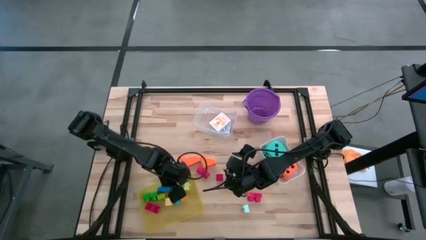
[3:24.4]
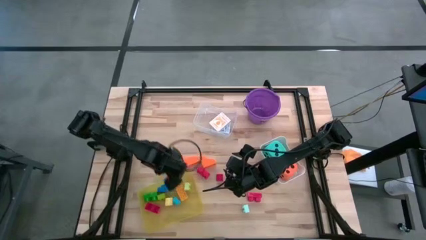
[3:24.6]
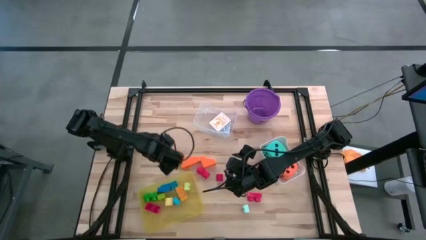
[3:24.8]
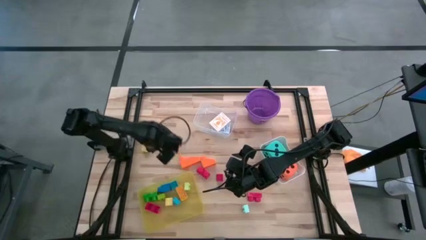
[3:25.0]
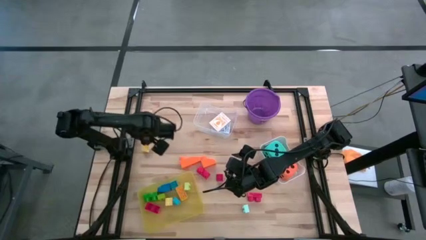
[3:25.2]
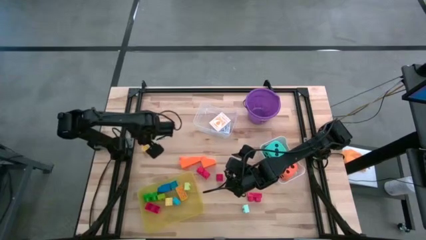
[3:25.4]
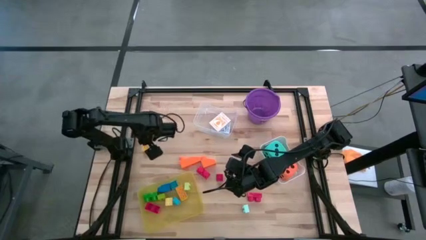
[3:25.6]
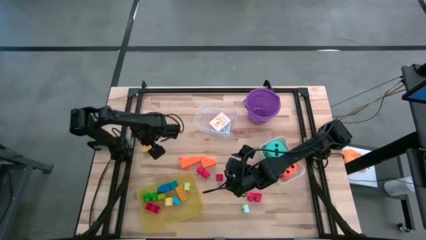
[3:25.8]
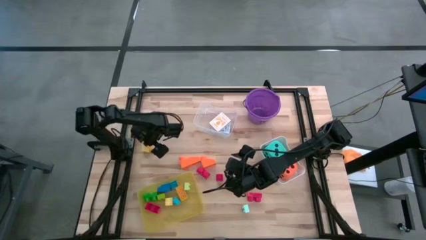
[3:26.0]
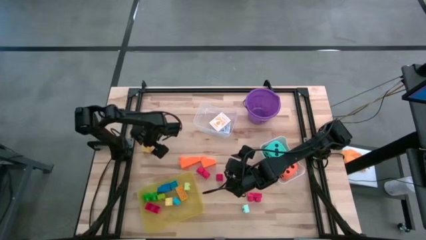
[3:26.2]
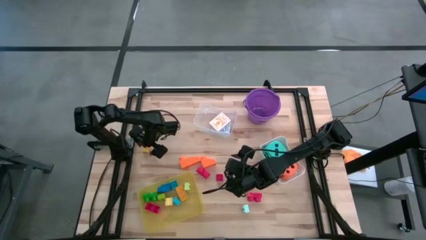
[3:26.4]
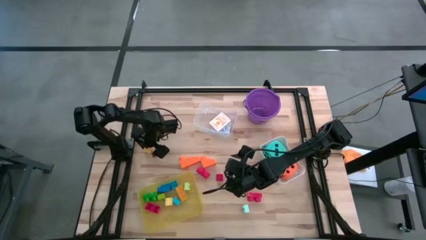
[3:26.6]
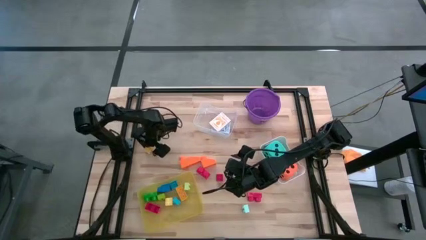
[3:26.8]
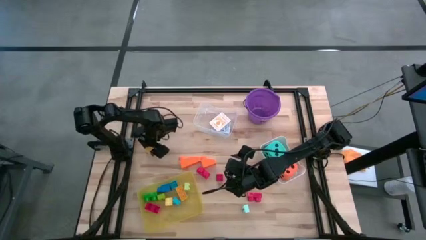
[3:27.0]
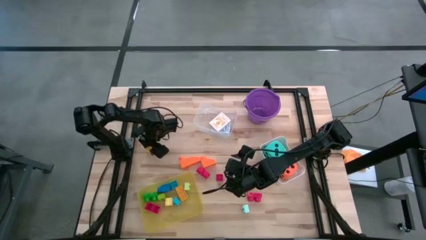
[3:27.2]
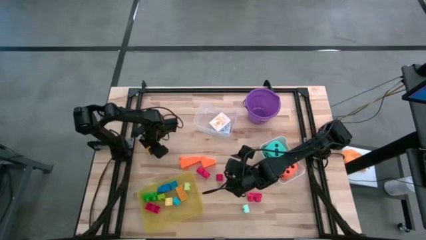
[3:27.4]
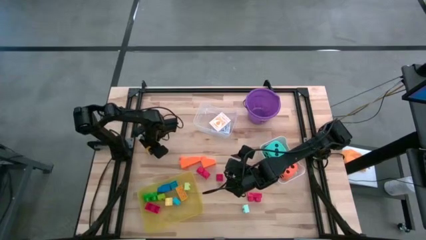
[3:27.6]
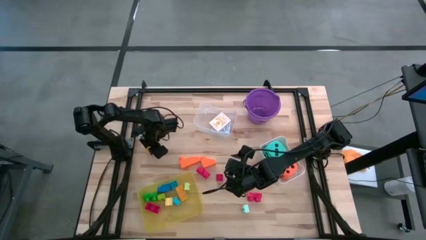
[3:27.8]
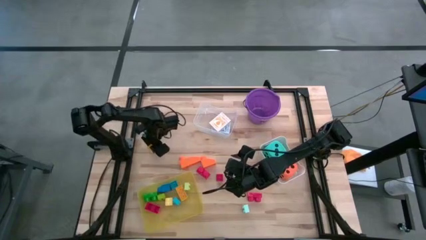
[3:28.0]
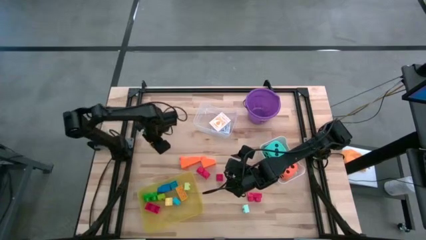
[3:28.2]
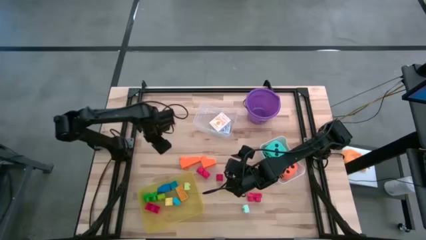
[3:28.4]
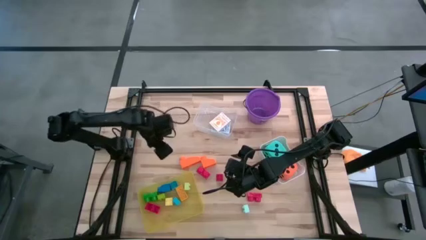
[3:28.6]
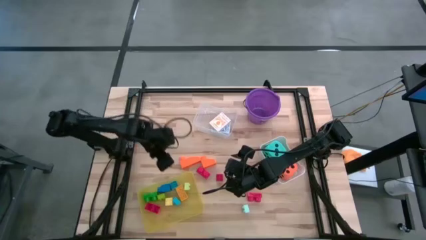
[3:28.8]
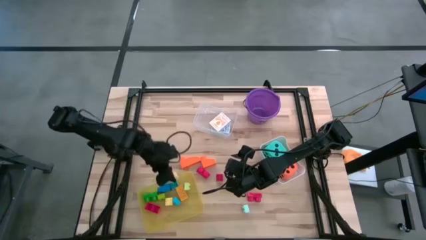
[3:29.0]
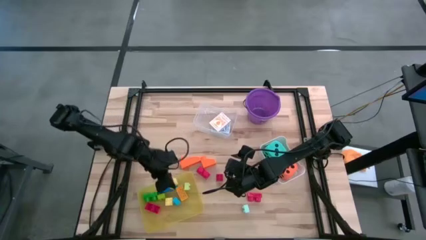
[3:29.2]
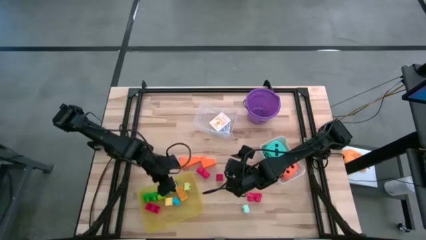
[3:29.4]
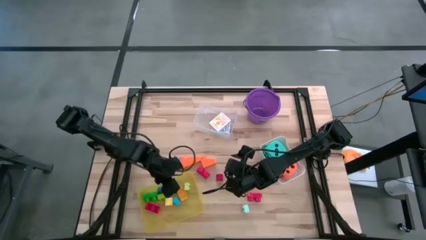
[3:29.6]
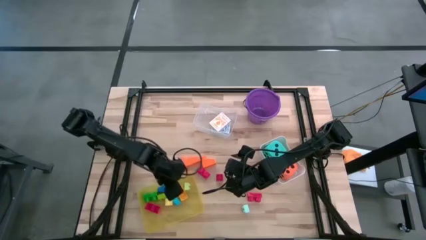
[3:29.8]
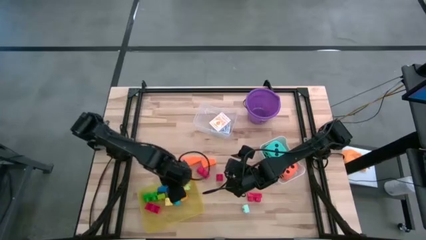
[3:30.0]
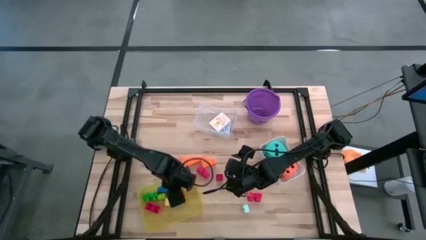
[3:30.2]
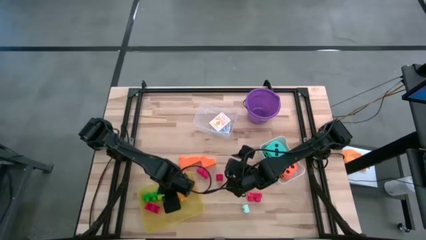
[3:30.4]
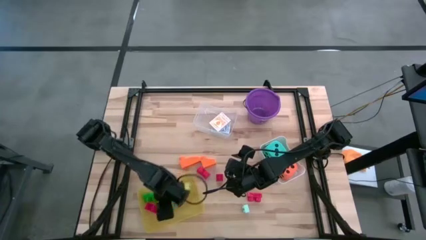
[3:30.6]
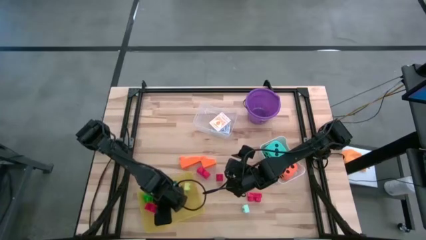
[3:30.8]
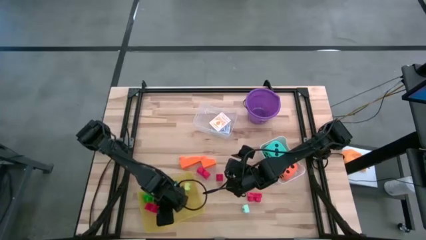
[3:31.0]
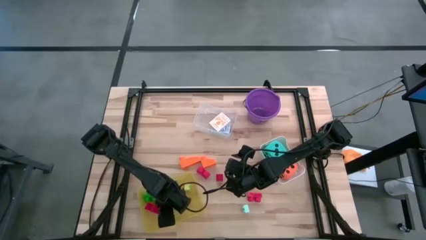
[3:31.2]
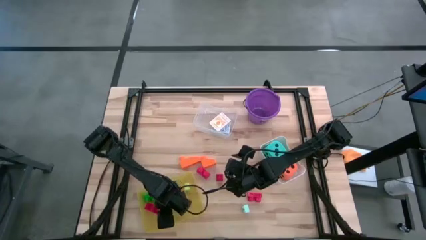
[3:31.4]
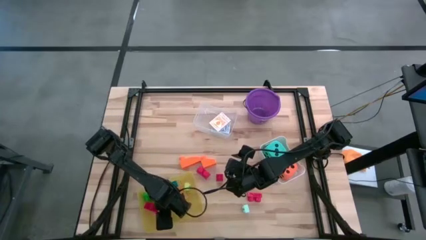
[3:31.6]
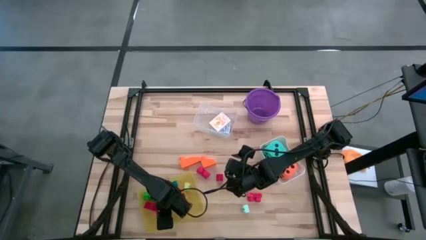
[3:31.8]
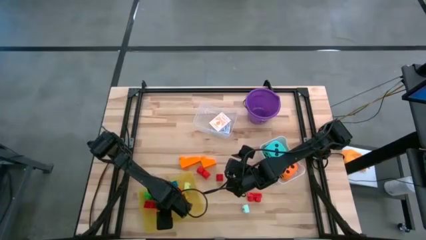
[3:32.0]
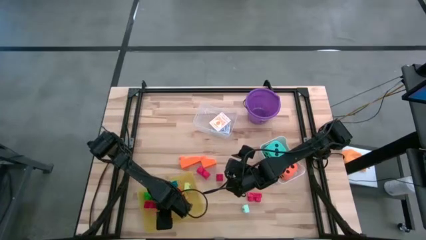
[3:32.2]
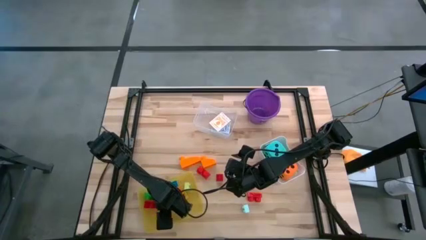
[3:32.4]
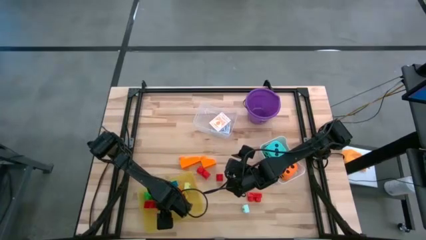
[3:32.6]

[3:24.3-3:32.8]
Task: Pick & Place Toys
Put the yellow game piece into the yellow bin

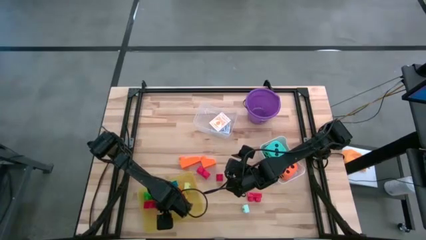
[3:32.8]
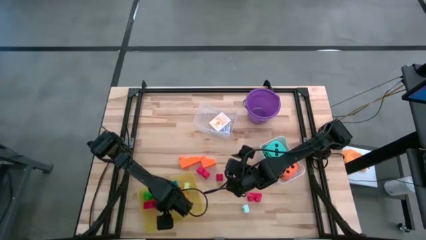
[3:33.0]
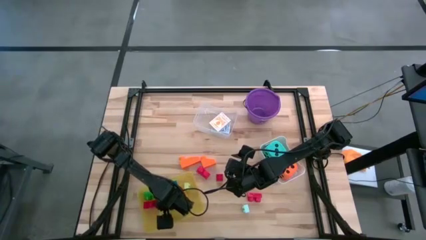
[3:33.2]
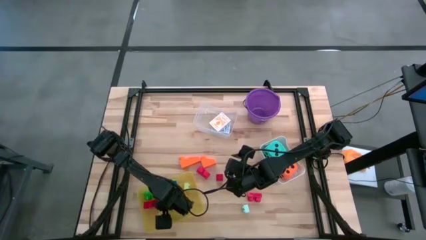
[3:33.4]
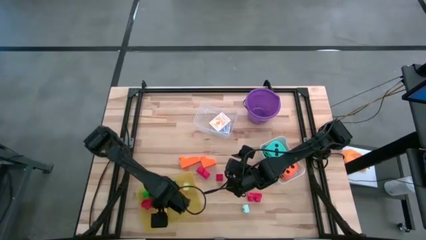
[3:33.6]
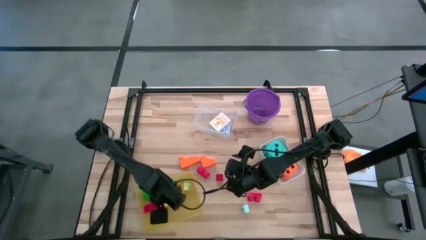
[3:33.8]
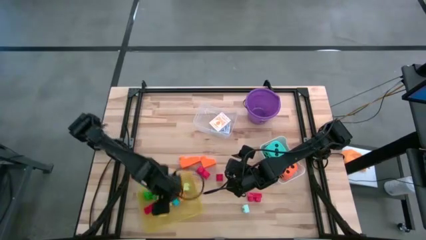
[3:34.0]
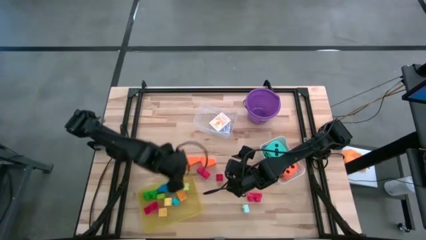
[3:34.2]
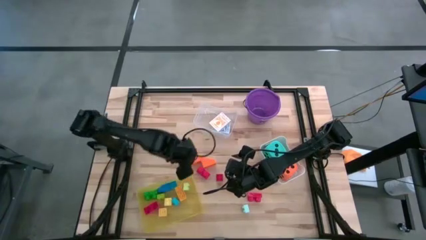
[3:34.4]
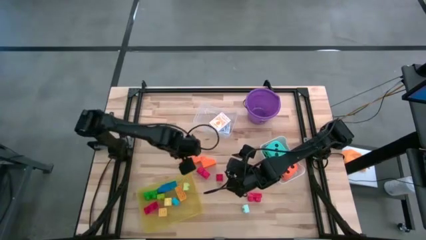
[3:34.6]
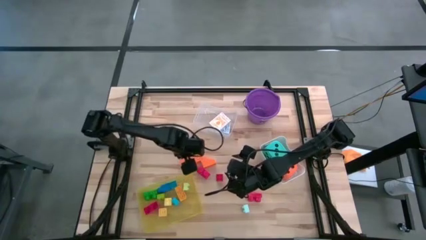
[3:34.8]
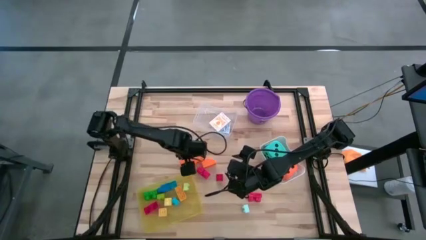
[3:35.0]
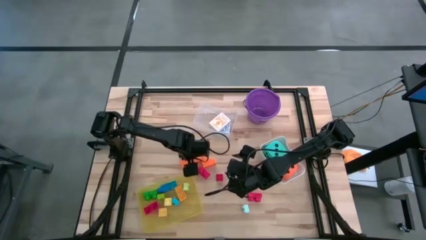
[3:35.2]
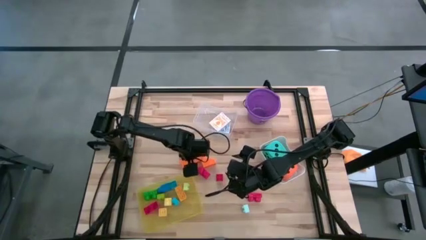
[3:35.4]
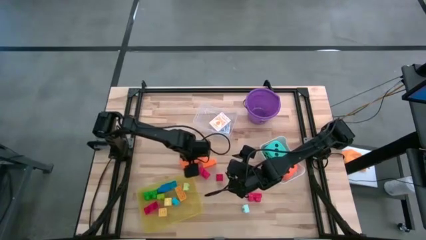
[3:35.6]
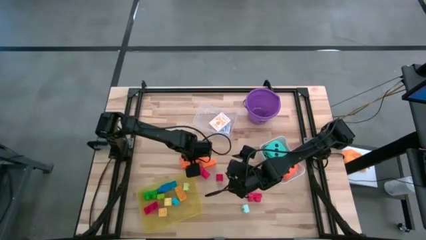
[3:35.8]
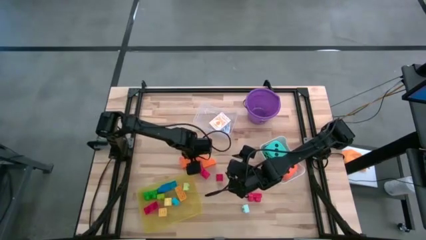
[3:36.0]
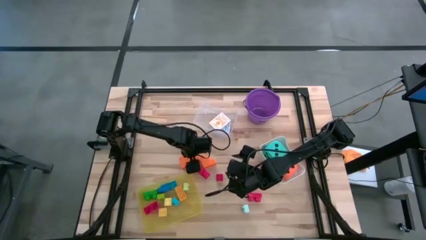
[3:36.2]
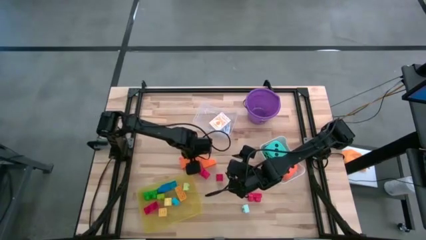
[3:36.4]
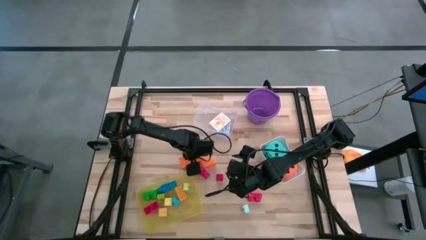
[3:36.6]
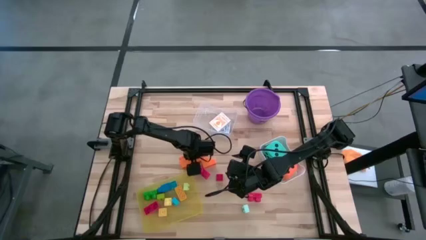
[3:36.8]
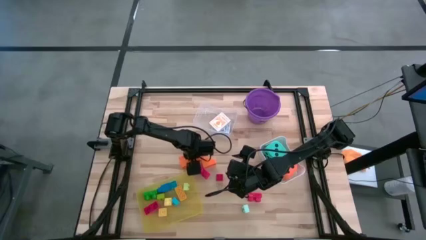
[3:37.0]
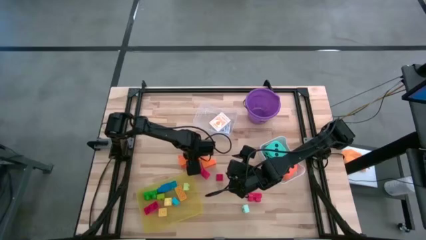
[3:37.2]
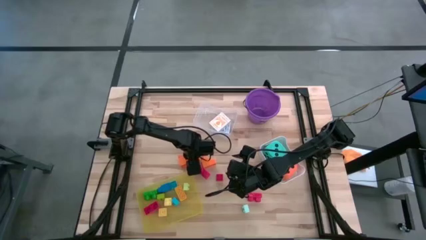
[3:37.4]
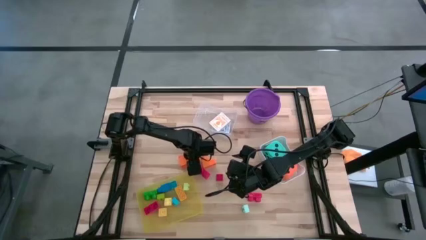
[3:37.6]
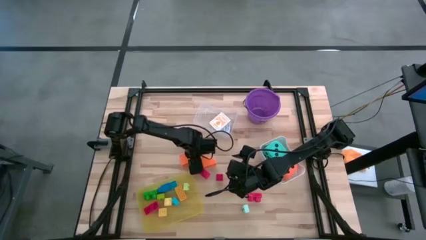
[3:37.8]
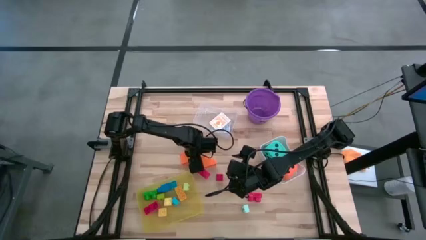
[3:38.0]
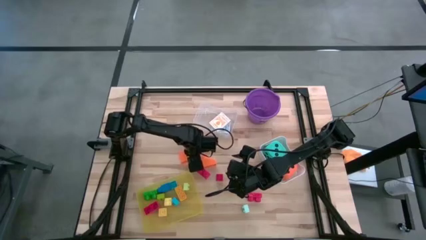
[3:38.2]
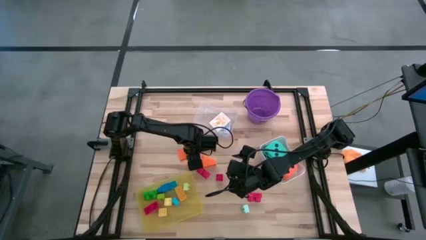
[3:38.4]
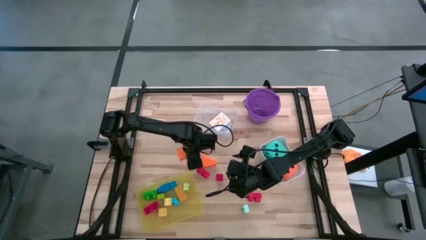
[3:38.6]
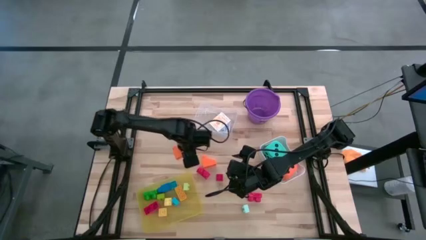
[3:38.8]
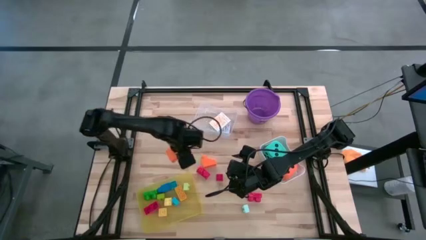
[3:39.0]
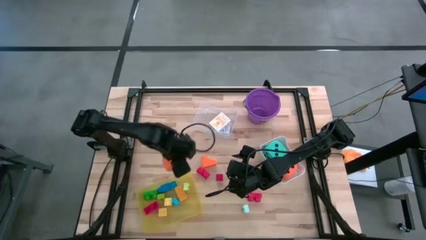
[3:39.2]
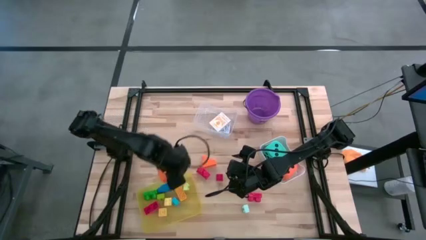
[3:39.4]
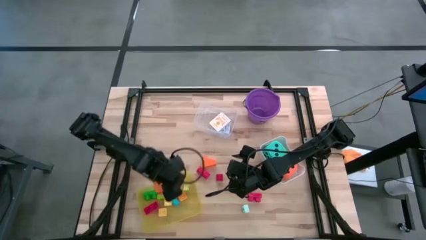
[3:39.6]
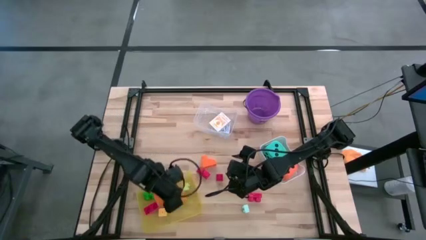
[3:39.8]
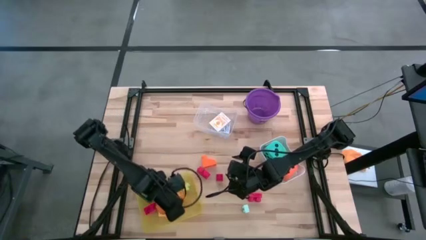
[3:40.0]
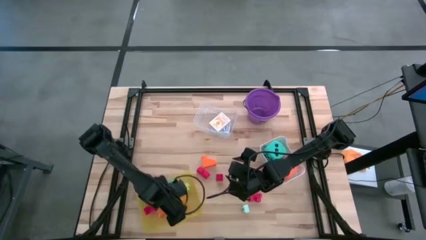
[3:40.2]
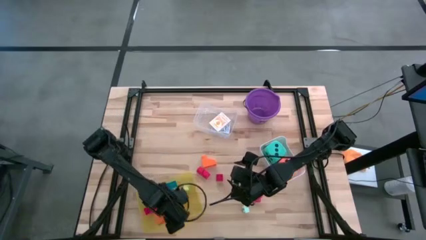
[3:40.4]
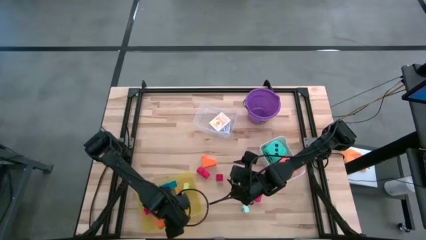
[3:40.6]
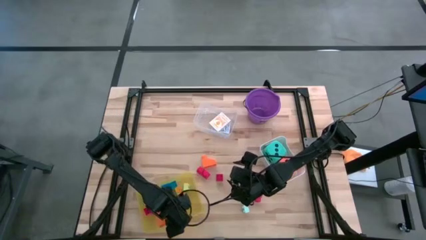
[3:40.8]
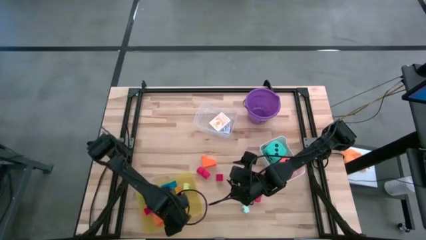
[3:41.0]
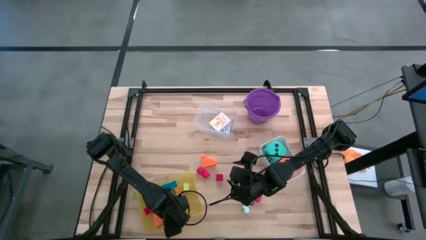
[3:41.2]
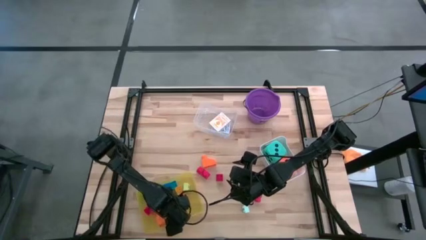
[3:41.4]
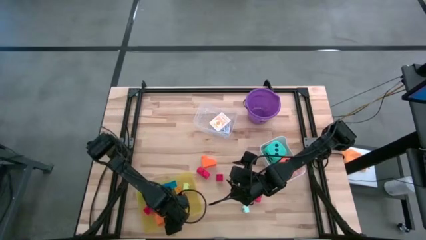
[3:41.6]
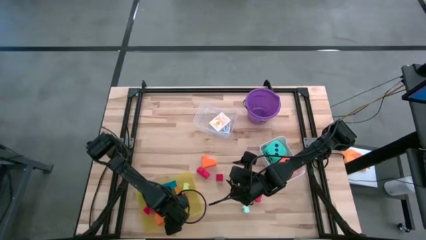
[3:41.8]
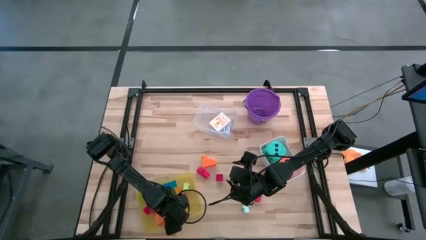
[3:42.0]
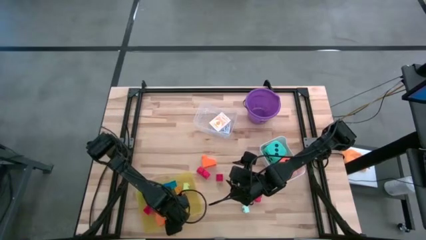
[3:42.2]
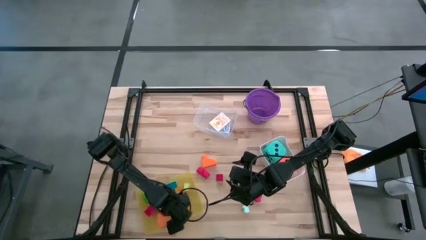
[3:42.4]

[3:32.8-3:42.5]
Put the orange game piece into the yellow bin
